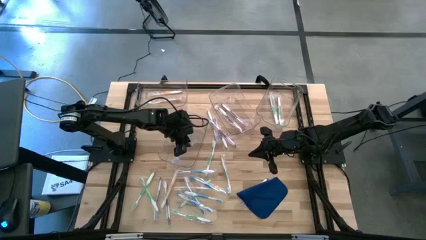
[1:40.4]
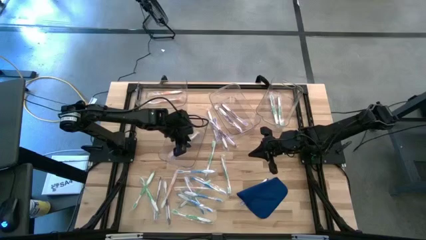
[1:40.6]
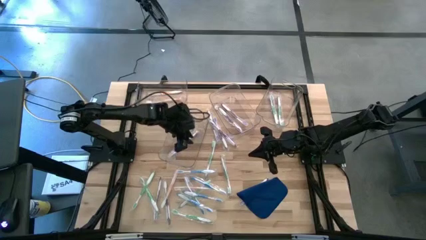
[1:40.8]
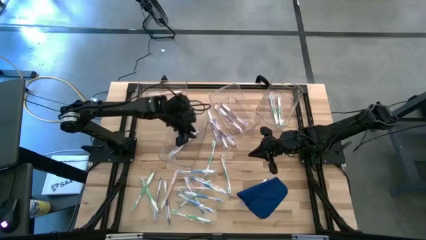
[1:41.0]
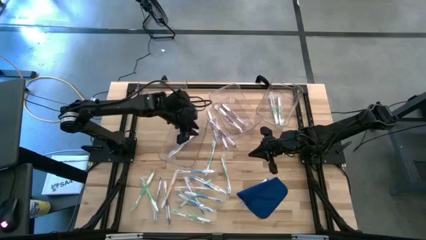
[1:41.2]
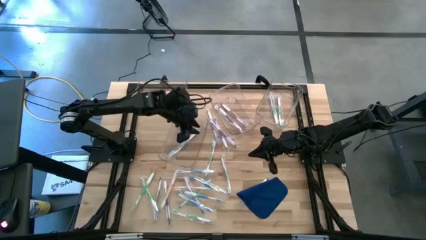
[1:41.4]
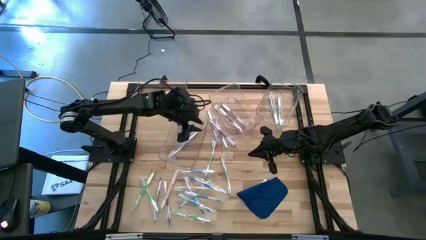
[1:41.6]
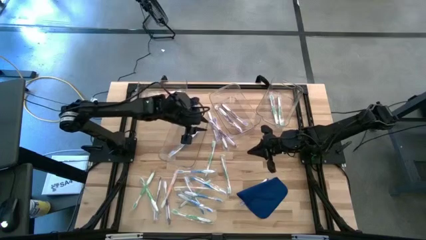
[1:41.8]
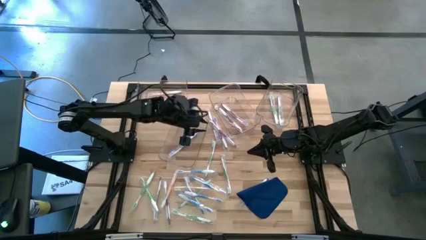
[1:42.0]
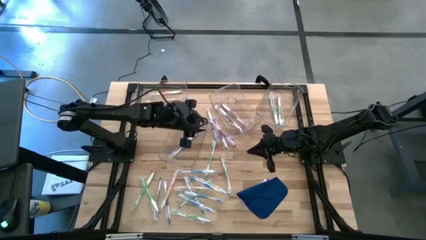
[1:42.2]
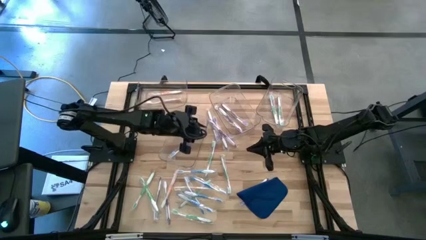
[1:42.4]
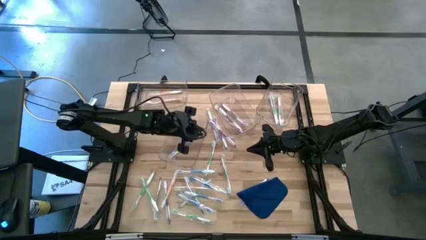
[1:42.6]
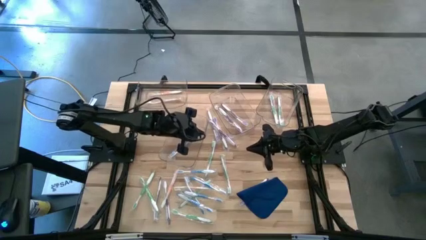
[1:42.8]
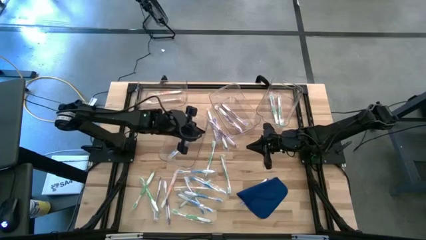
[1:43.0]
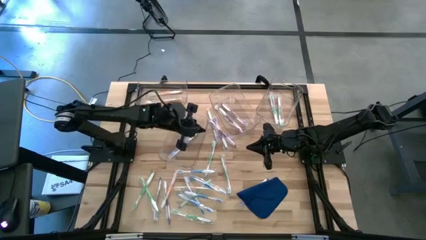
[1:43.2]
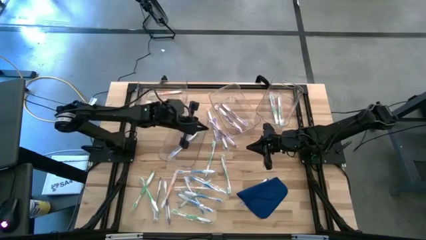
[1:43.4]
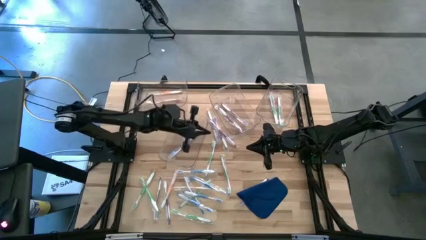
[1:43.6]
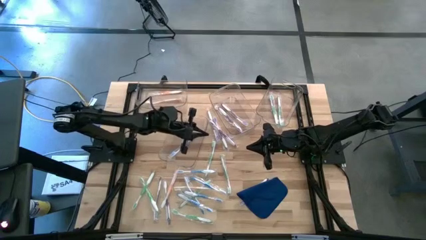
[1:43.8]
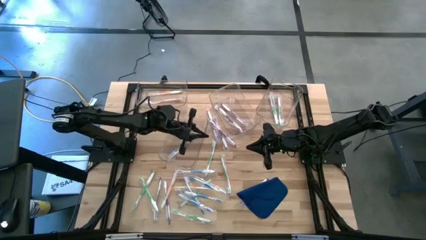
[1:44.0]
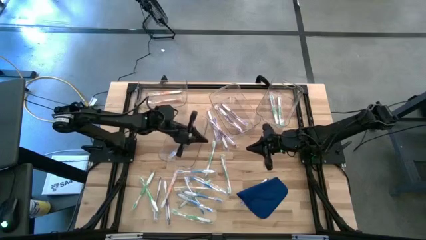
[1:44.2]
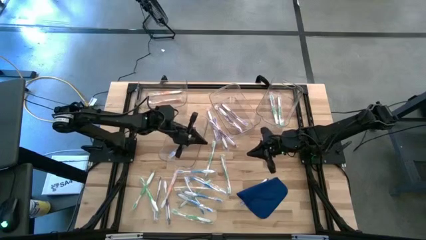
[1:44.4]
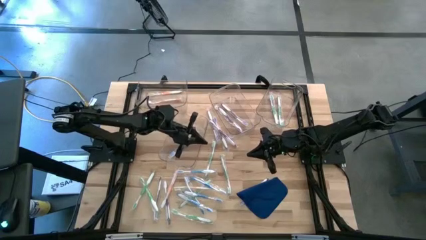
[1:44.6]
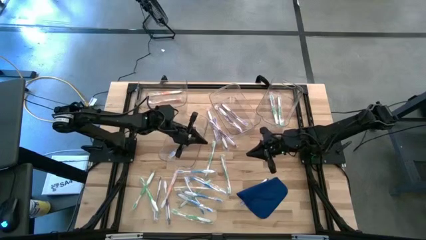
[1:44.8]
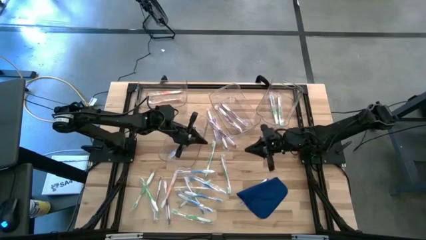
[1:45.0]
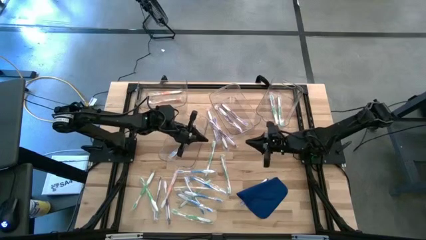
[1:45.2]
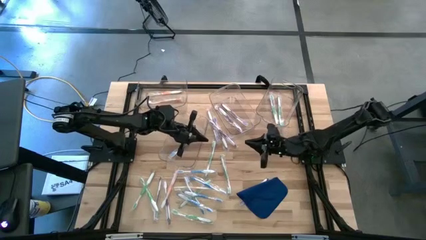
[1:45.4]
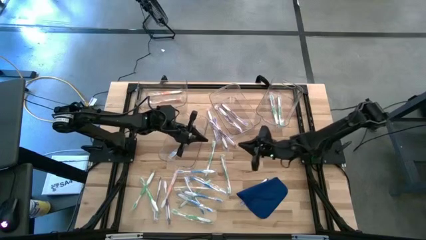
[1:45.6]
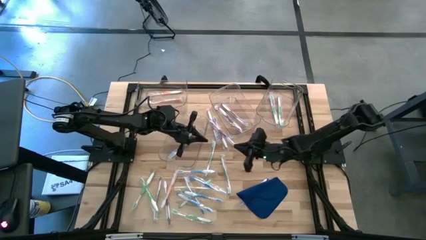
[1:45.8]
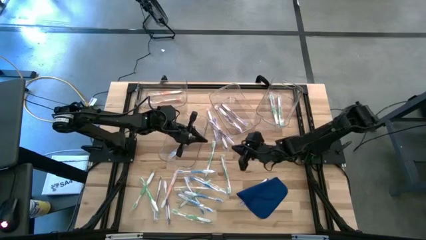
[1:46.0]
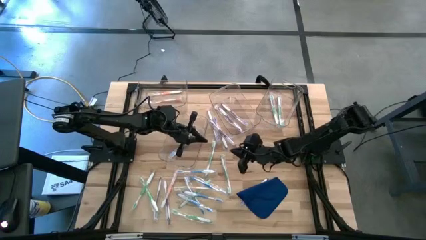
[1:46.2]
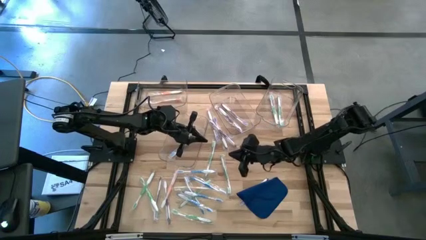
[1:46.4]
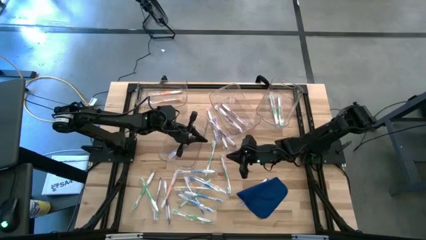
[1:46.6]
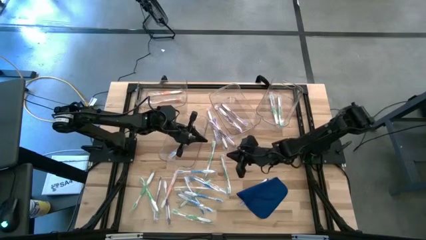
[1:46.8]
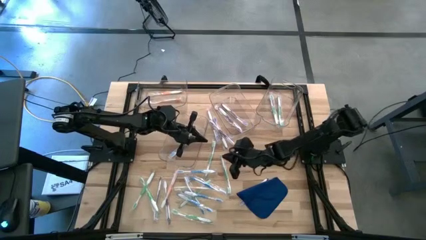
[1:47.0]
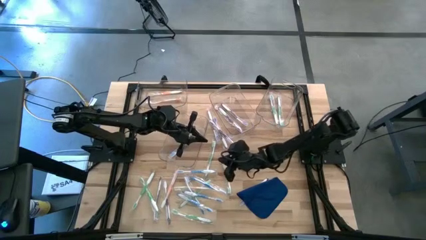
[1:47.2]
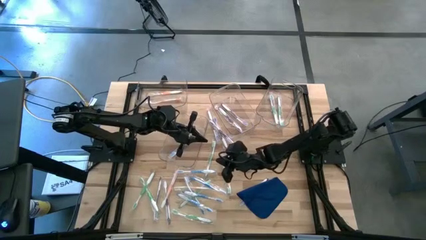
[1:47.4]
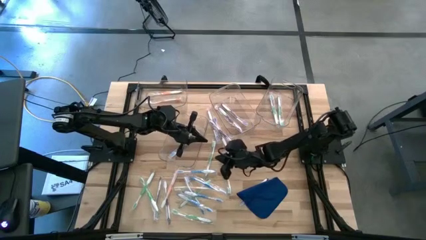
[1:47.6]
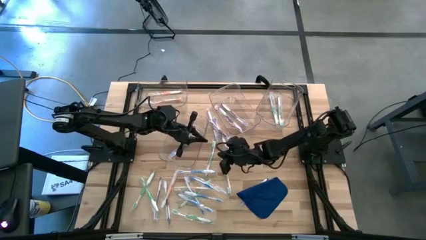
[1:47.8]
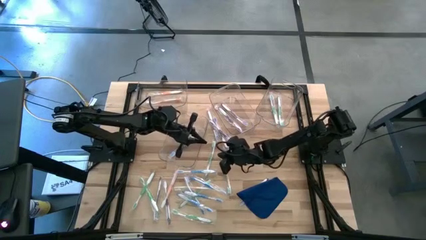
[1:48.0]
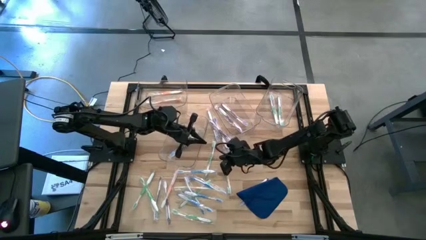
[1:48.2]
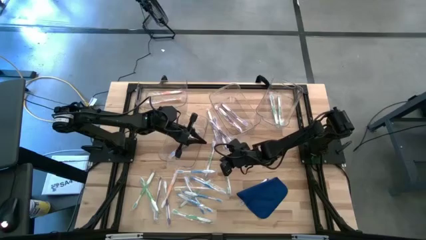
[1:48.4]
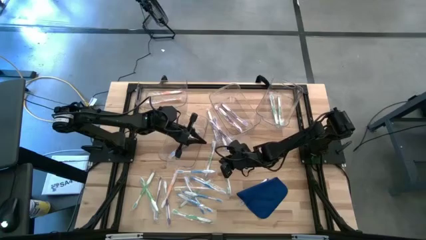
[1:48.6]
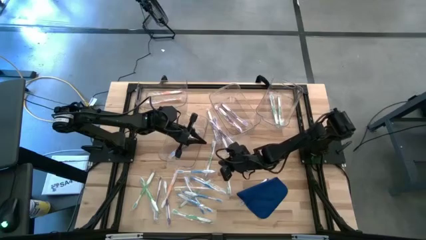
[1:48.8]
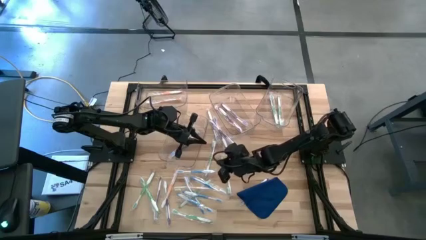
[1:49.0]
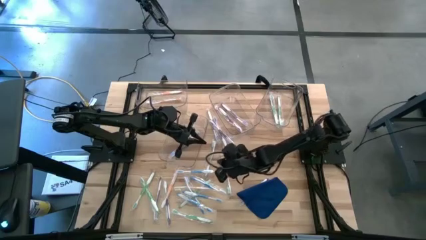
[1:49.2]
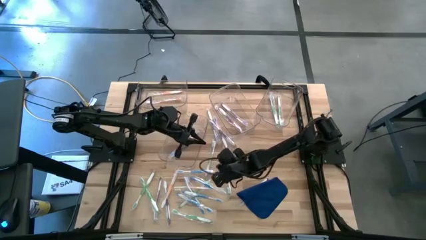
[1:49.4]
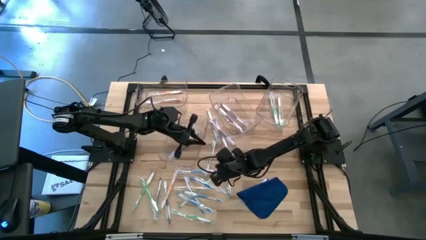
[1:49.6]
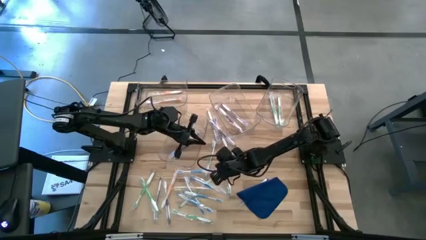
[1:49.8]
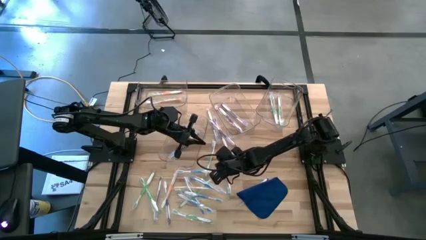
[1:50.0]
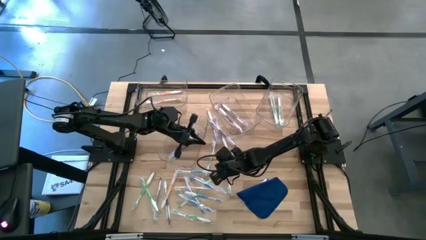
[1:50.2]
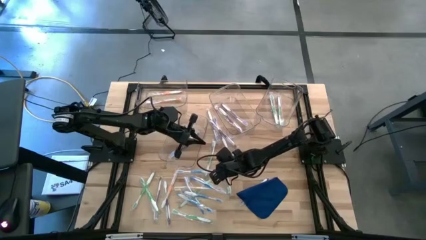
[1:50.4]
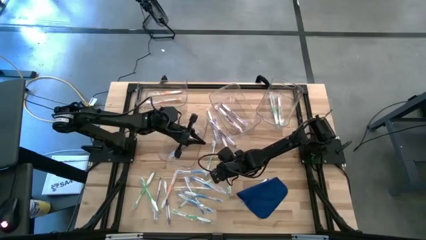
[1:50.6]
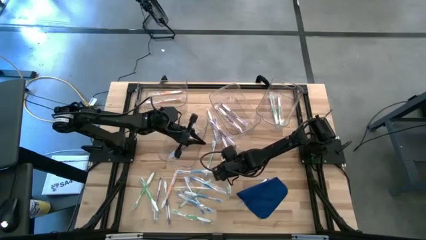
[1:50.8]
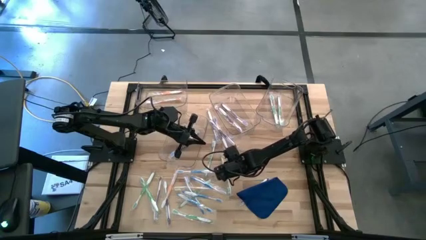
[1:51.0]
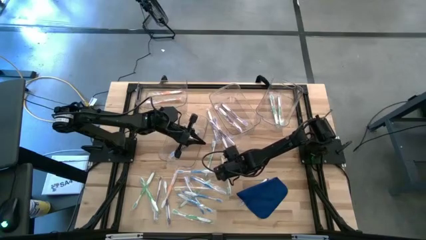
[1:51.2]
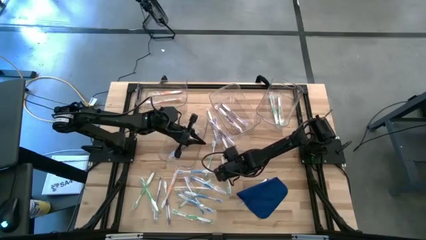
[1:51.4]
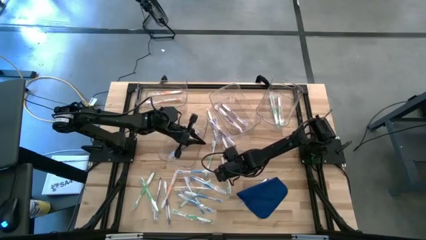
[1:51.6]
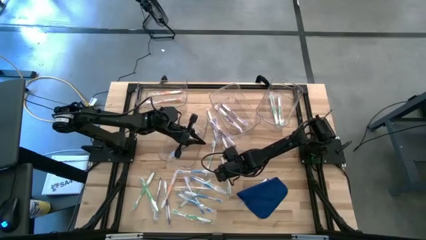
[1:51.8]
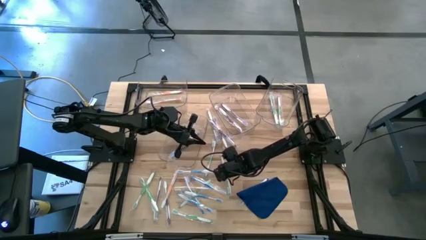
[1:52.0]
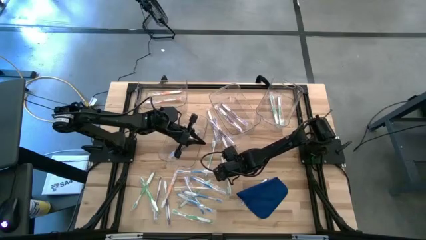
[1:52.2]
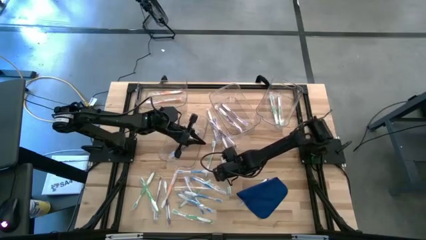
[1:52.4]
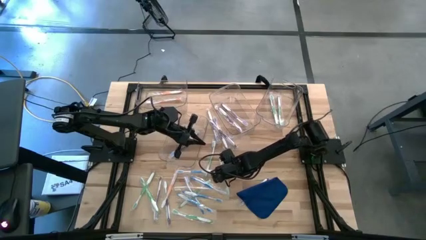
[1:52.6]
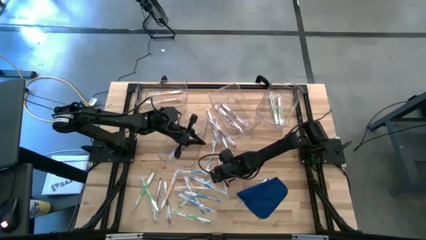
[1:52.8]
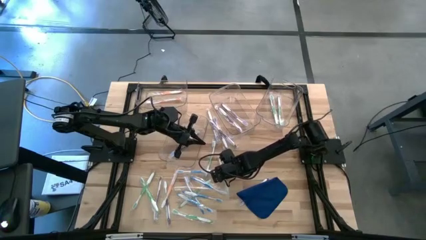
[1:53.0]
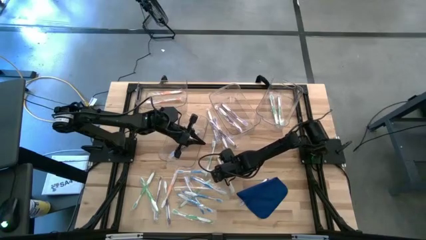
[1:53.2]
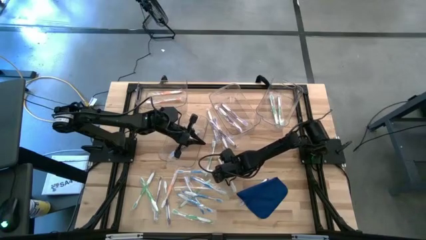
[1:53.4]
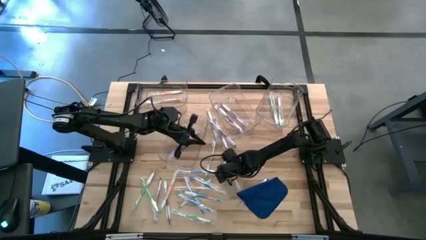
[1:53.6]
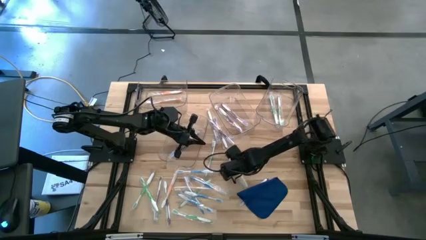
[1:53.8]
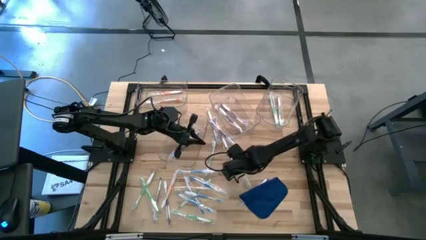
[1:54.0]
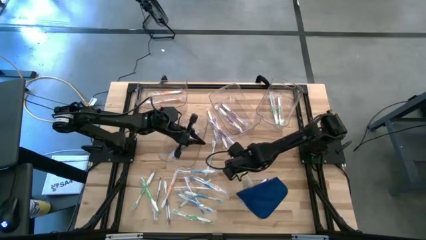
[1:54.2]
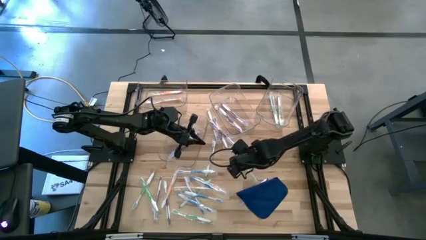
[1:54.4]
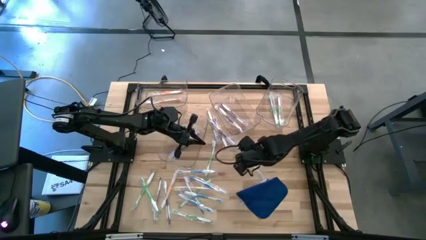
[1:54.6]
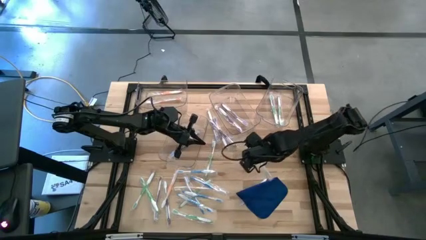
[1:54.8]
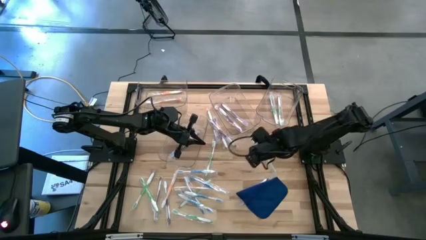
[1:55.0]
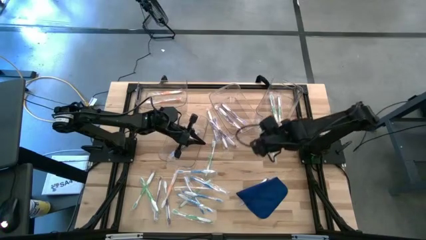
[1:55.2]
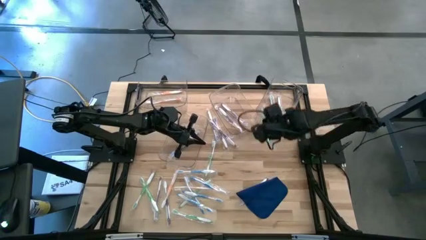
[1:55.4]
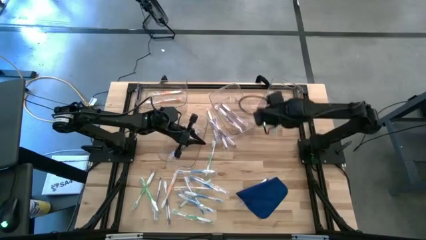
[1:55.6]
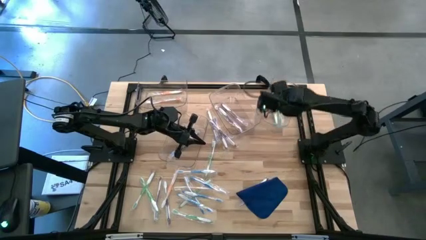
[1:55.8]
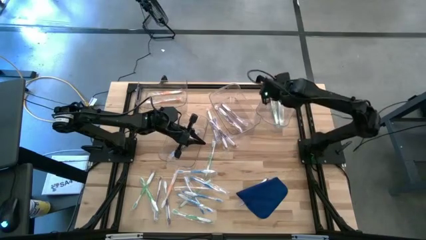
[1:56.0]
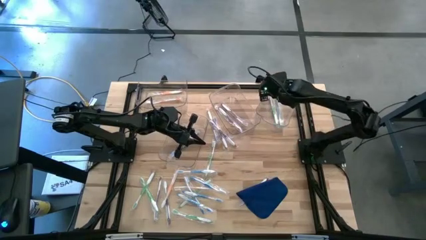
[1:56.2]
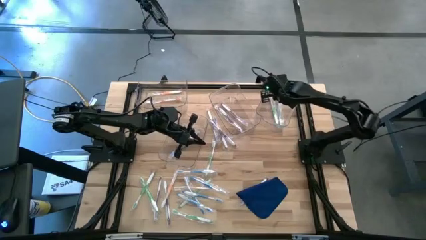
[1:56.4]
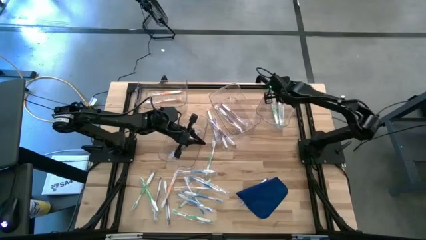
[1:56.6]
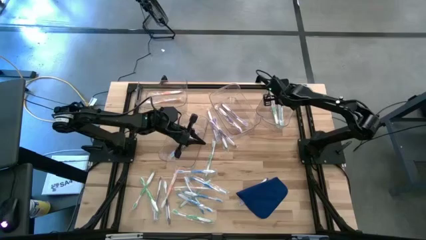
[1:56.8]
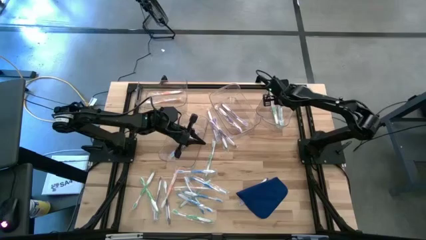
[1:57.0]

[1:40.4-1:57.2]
Task: Pick & Place Toothbrushes
Put the green toothbrush into the top right transparent bin
